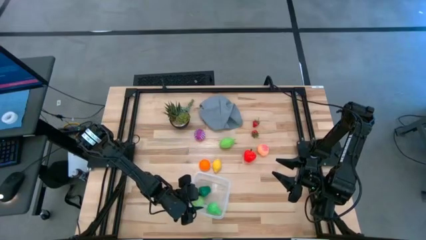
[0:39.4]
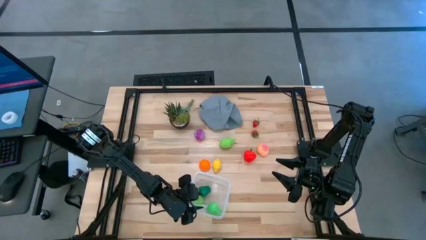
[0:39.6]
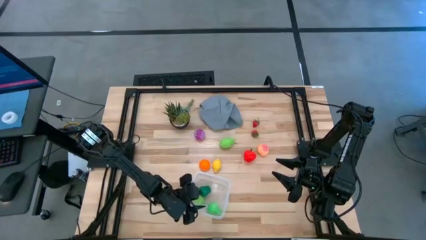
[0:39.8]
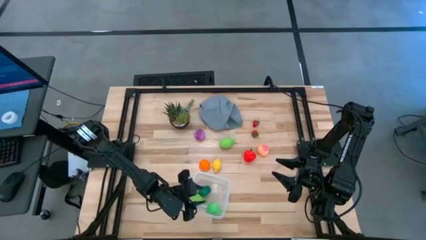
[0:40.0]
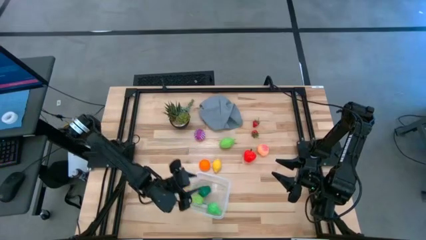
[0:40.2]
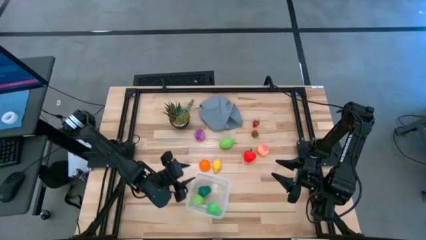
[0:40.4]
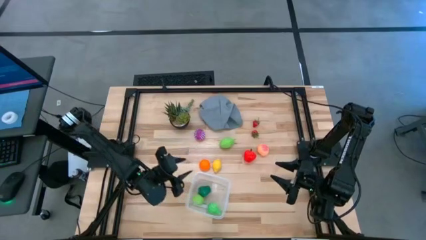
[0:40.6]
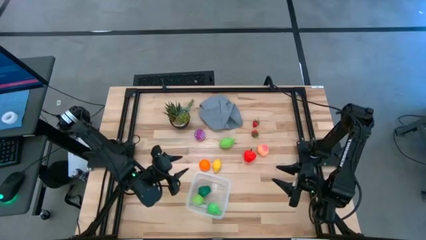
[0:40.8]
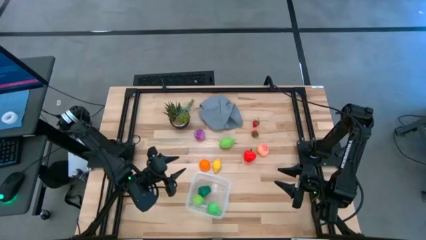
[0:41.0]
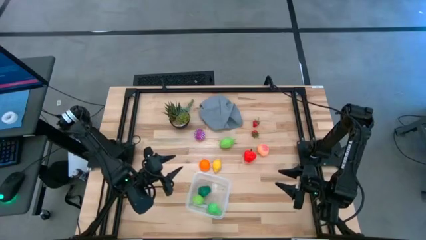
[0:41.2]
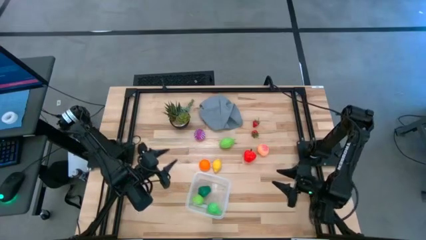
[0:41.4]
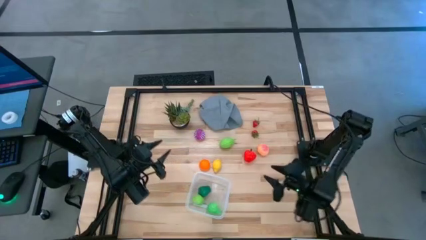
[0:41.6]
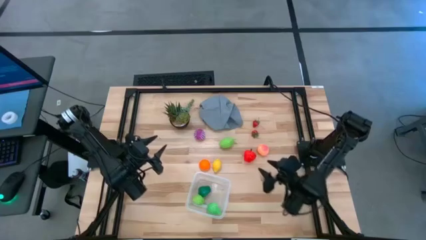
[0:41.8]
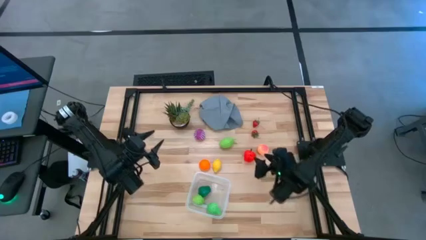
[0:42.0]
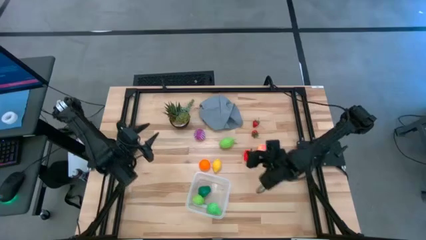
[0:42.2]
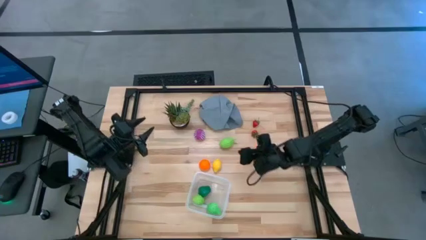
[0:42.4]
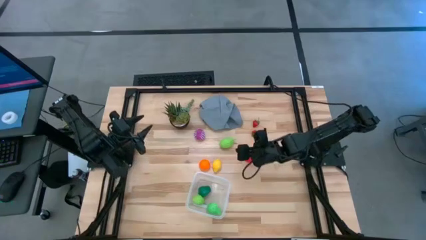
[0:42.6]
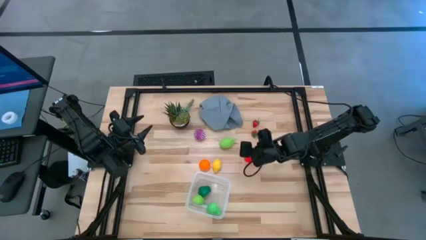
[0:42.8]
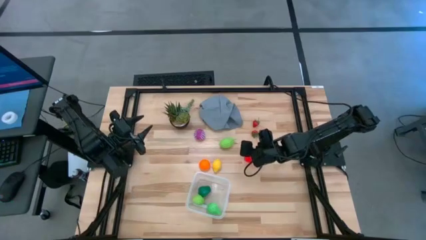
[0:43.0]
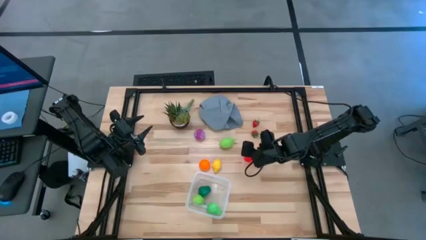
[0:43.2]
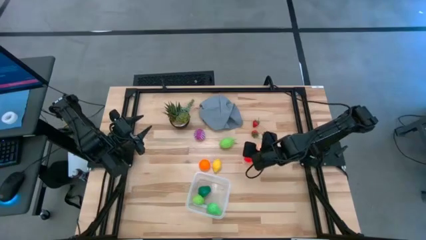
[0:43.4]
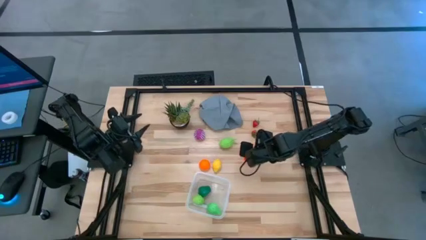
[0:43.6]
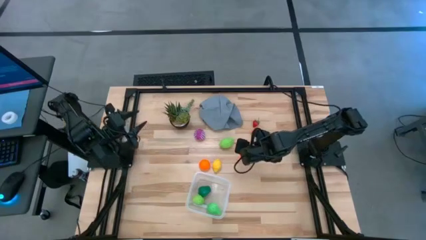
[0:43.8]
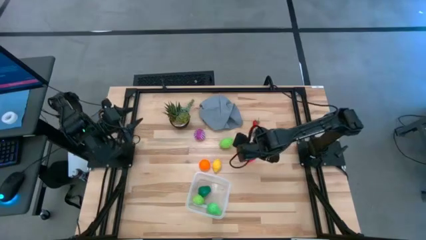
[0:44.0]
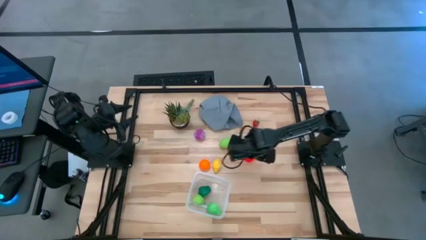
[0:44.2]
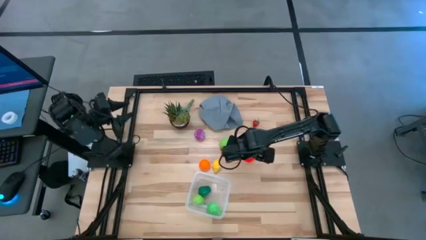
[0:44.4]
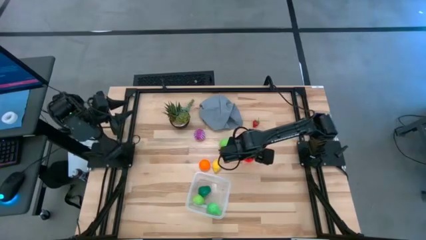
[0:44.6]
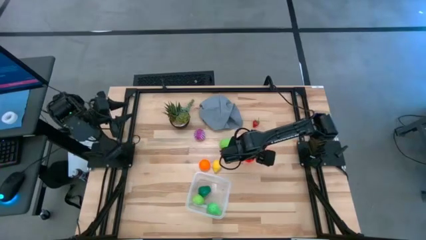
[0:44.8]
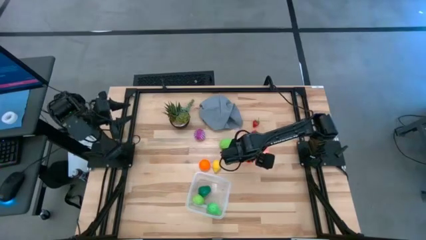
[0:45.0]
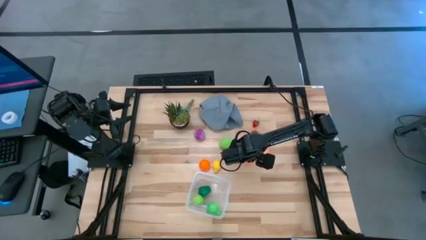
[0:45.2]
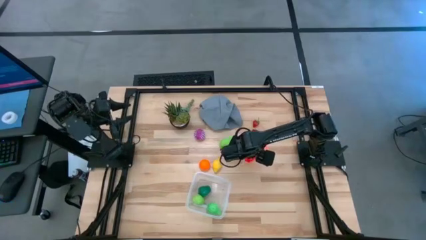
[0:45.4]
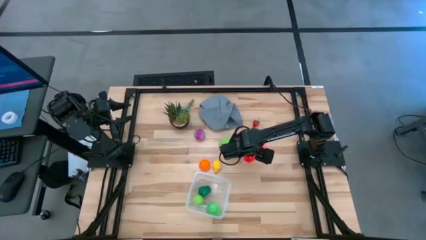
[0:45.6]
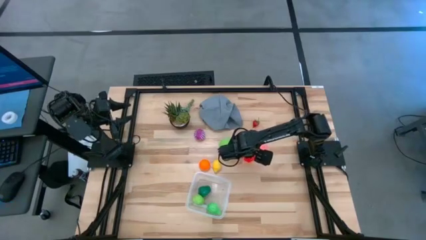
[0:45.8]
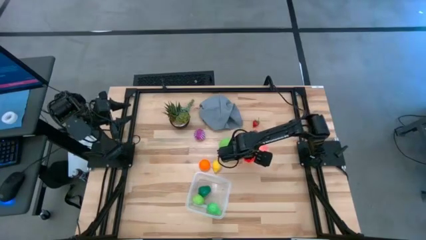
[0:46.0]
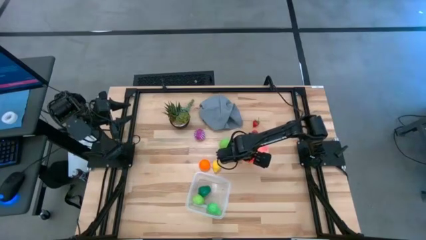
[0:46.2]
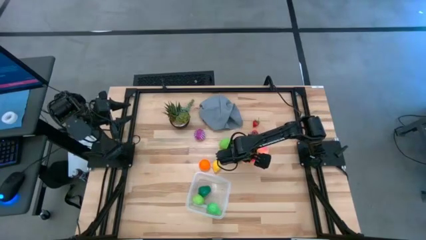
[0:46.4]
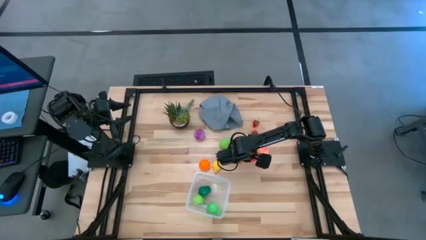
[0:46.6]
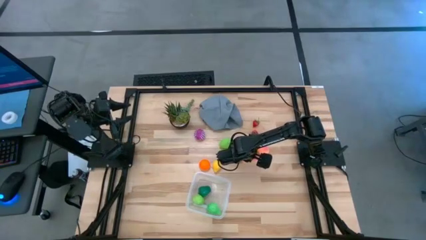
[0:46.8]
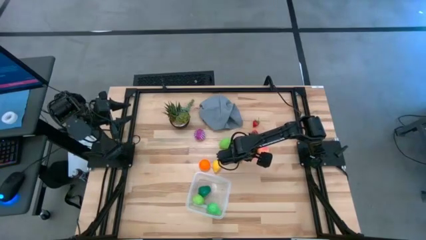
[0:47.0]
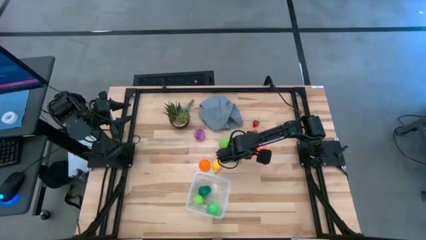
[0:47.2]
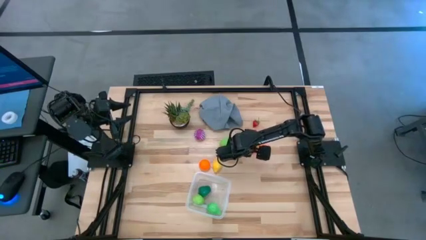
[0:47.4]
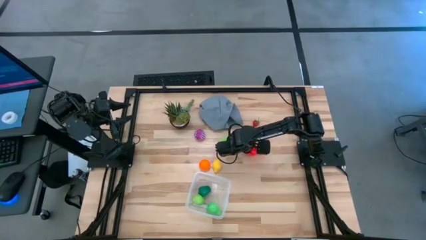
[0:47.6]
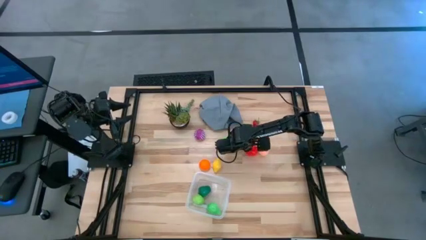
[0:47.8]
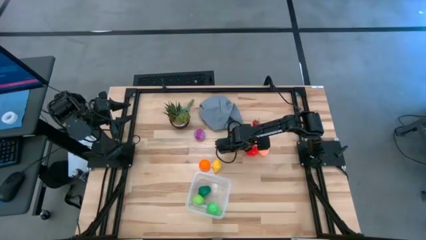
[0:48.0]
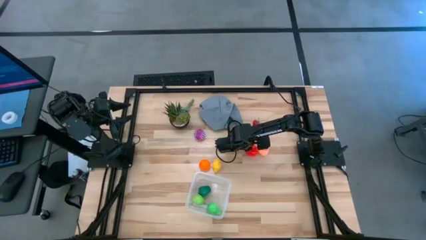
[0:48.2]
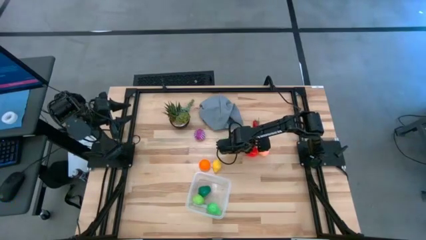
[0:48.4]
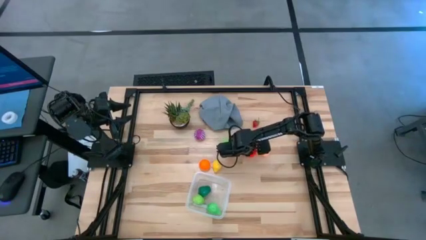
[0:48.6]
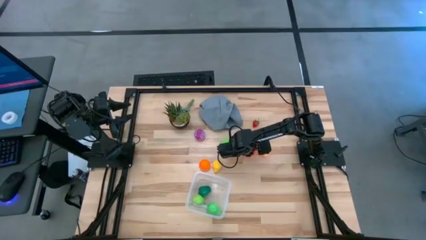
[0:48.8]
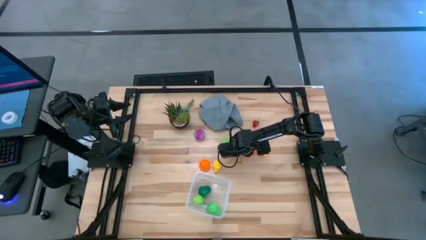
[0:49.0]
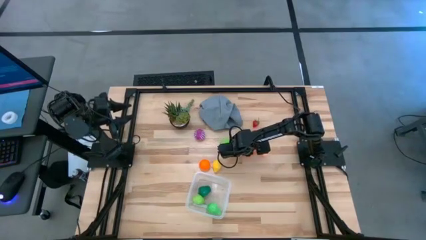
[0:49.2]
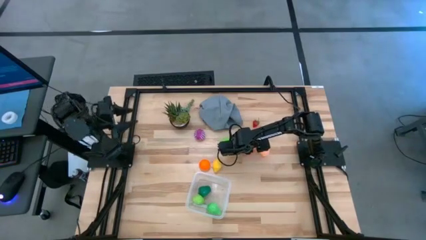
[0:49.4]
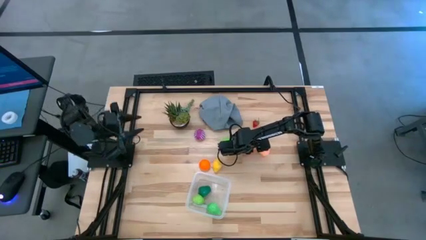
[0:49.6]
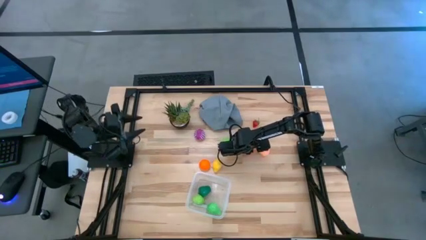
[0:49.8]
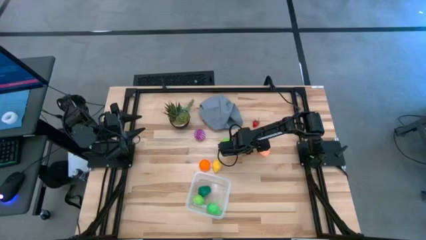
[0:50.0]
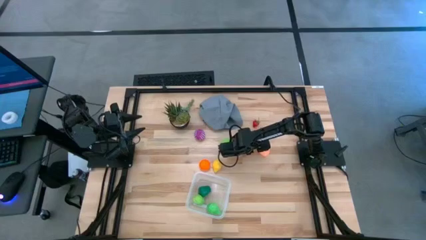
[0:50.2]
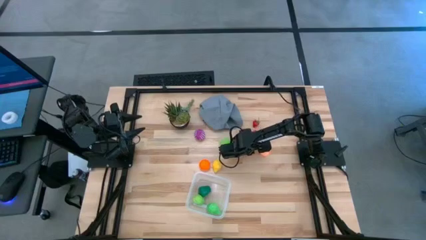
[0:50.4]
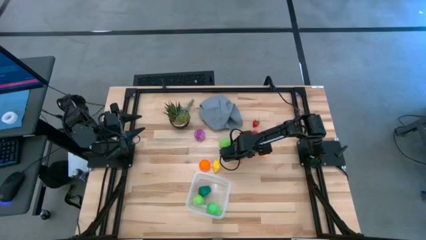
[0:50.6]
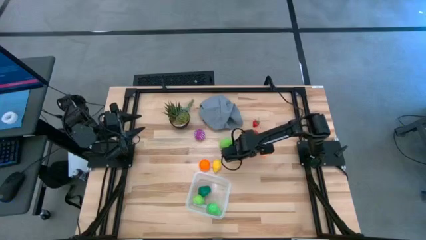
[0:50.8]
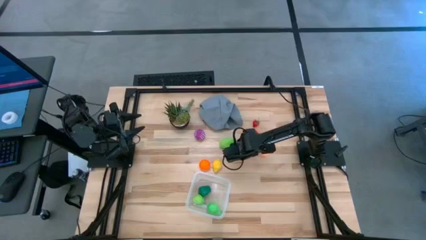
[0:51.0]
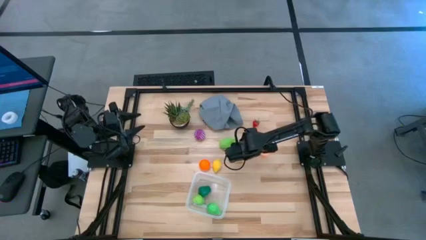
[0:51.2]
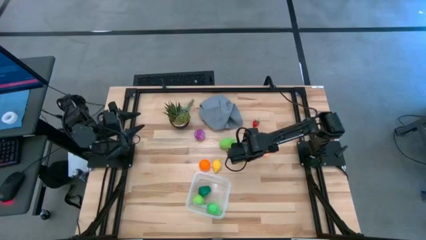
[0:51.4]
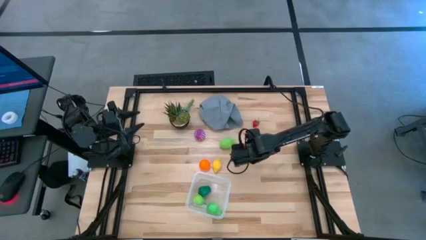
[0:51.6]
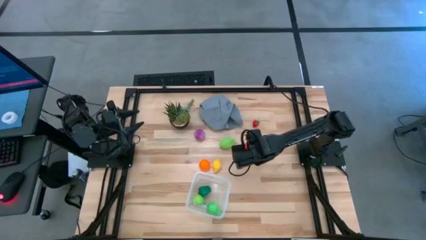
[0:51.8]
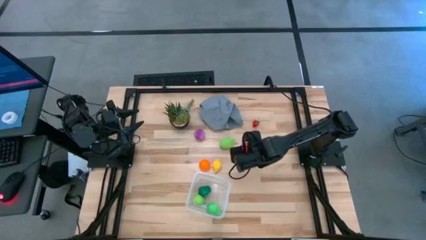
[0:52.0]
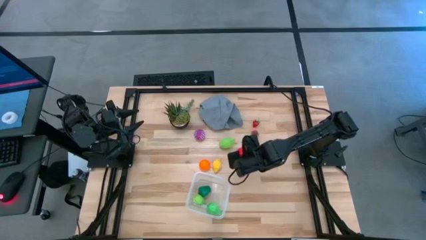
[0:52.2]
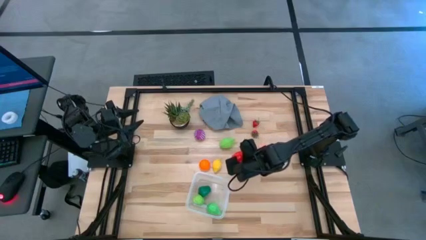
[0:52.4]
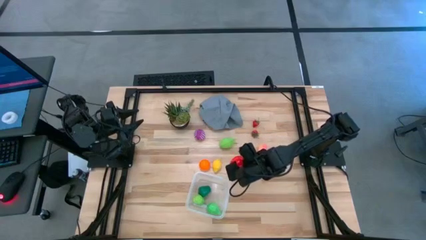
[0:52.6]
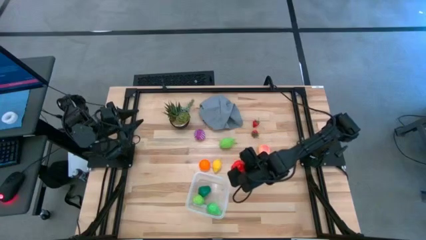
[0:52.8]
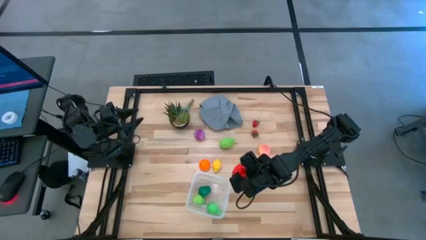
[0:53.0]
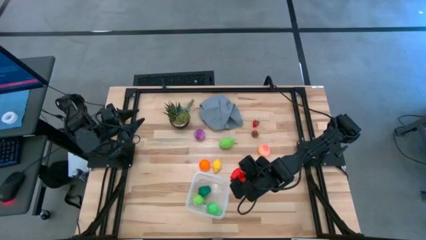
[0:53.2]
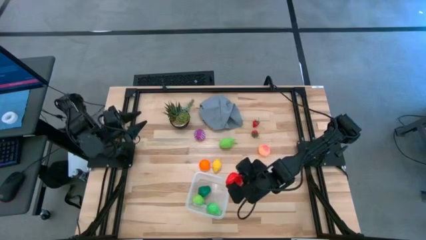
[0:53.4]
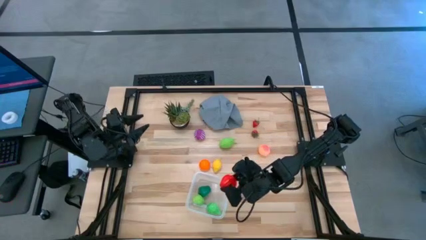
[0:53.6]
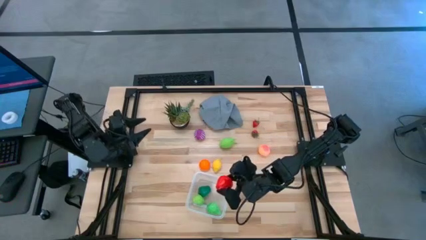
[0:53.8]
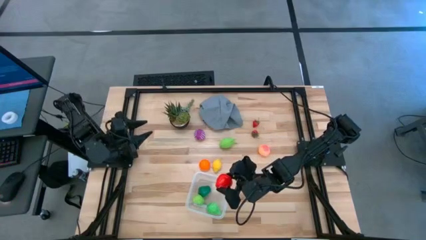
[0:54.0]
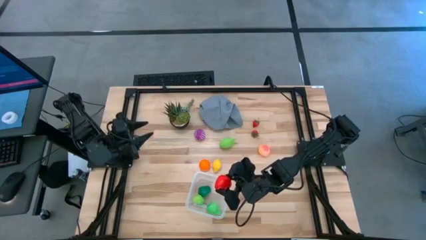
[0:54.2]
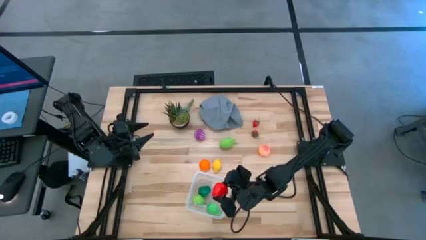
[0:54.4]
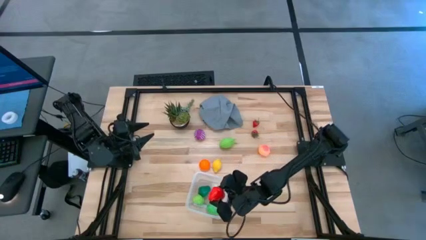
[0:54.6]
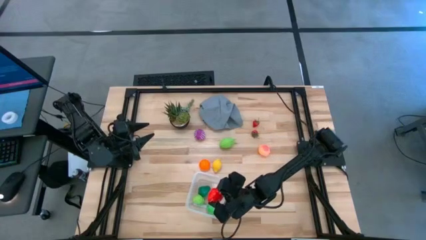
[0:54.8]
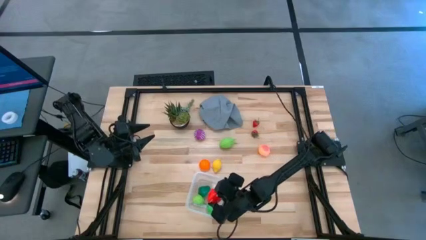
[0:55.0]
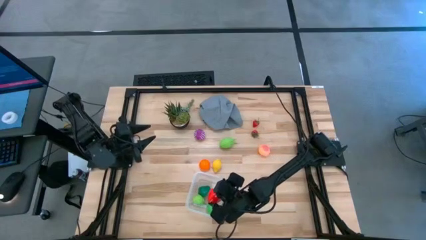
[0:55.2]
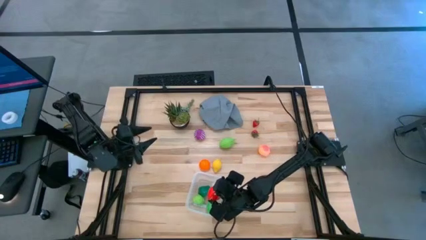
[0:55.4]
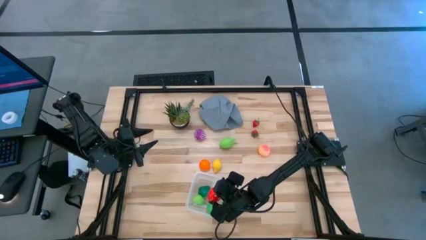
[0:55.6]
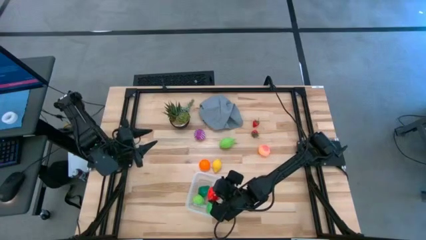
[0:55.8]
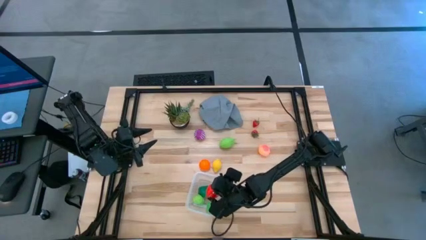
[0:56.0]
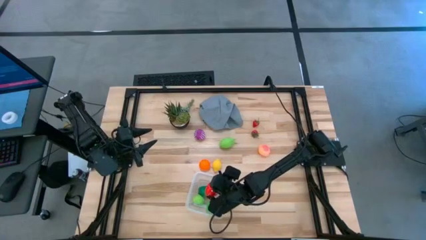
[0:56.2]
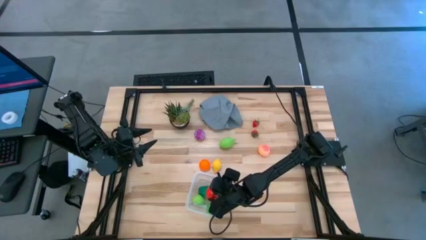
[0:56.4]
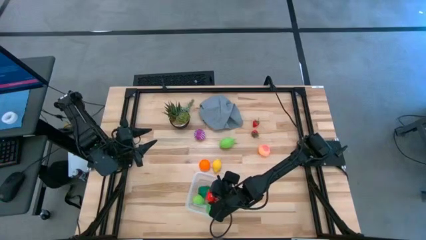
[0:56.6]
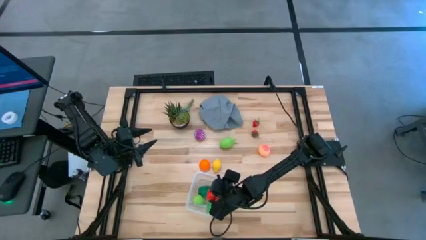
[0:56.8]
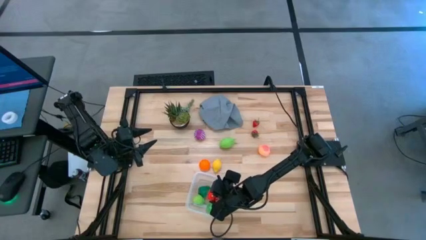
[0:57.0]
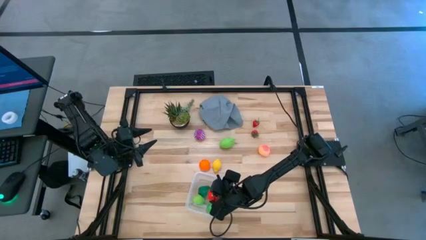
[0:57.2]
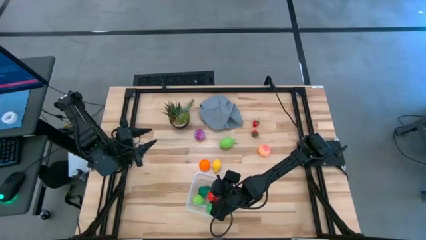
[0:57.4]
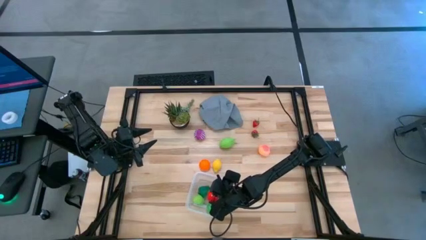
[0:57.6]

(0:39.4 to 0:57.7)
Task: Pick and placing Produce into tupperware
Put the apple into the transparent bin
